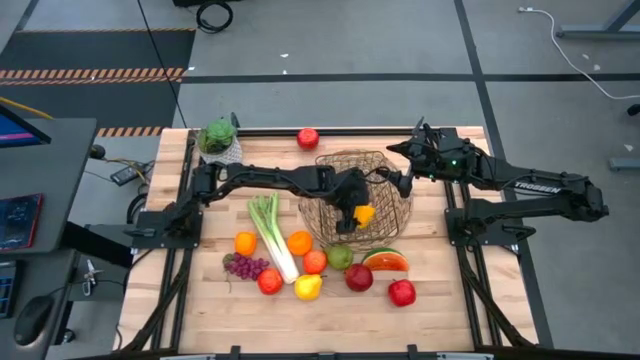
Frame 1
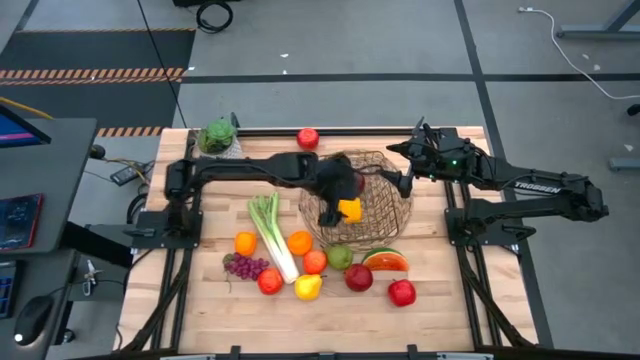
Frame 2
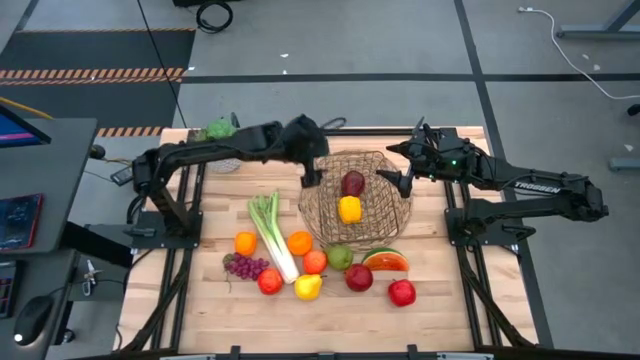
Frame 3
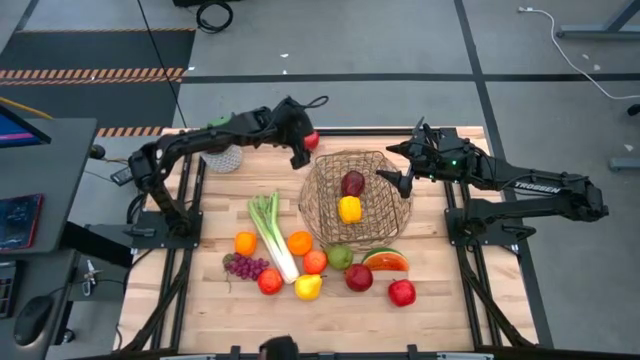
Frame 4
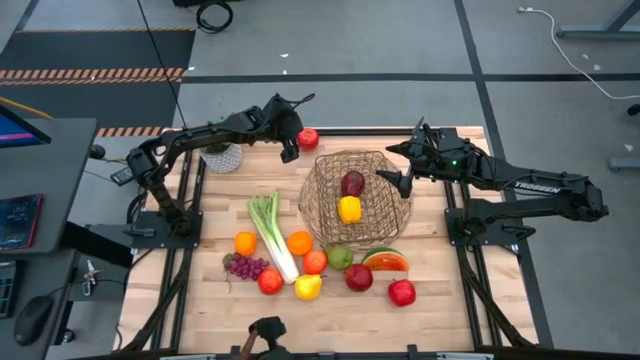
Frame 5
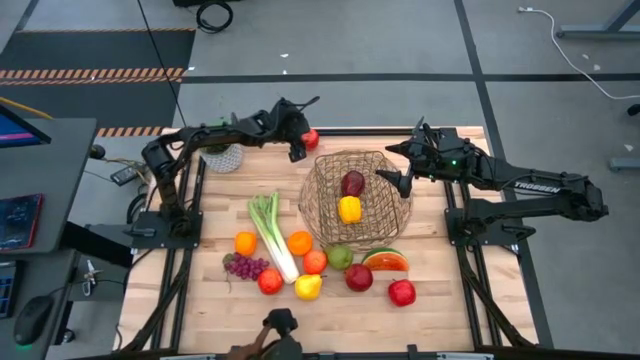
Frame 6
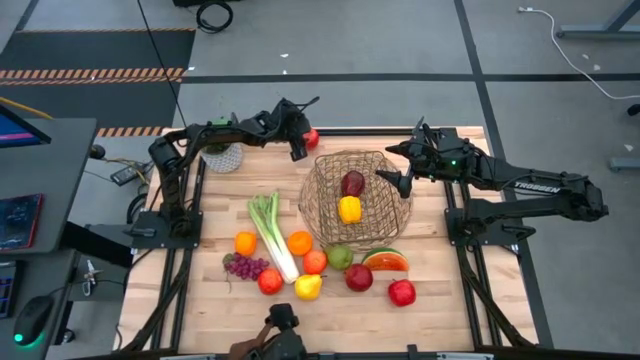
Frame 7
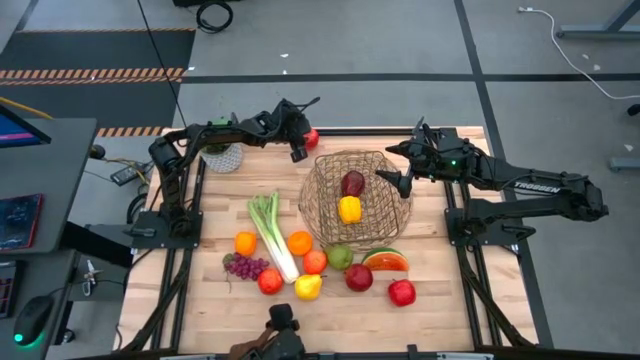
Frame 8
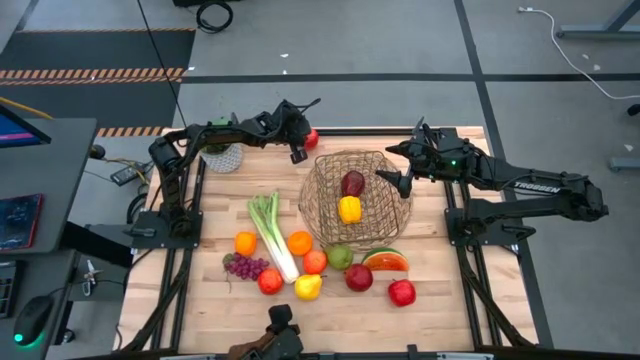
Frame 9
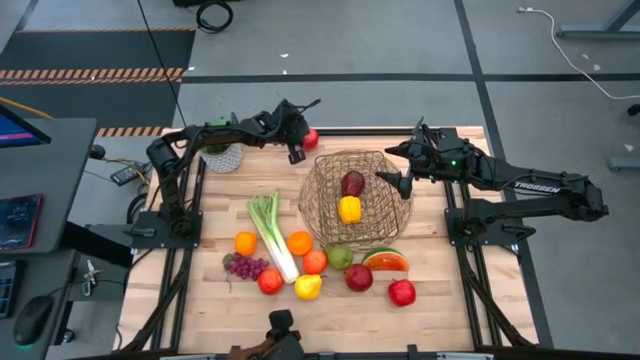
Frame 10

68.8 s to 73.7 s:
Task: Build produce basket
Put the red apple into the brown wire basket

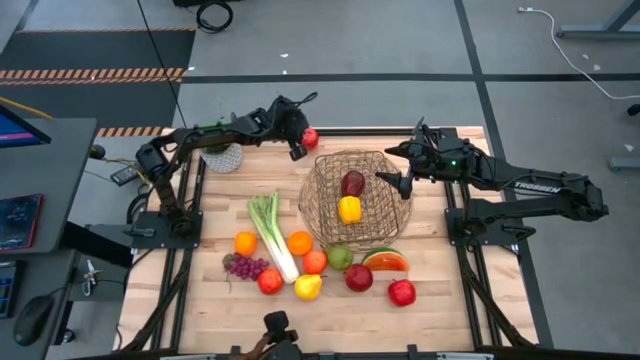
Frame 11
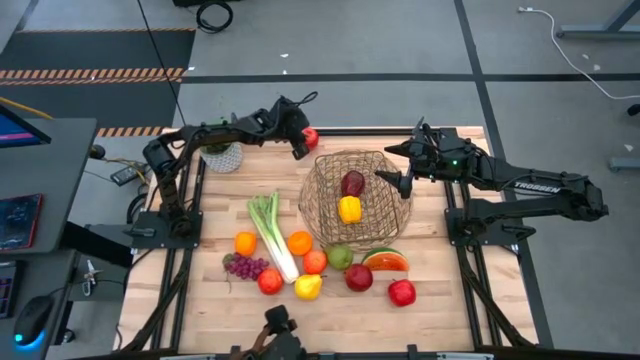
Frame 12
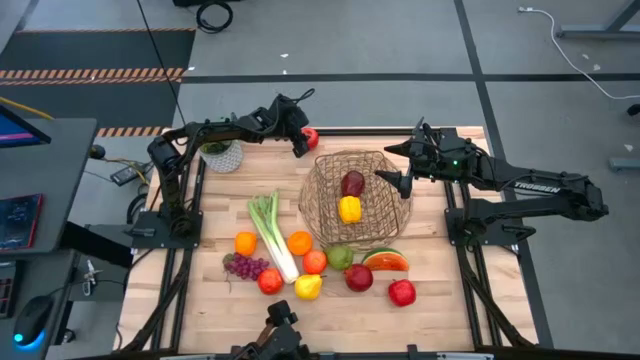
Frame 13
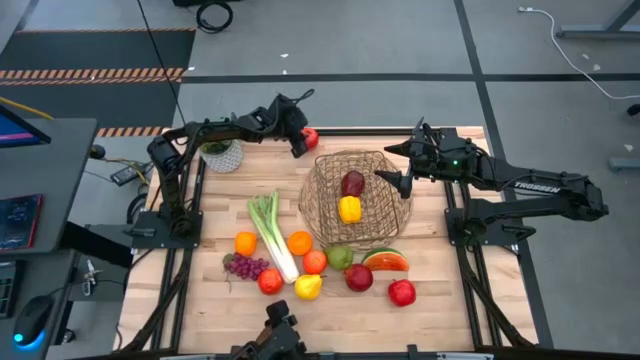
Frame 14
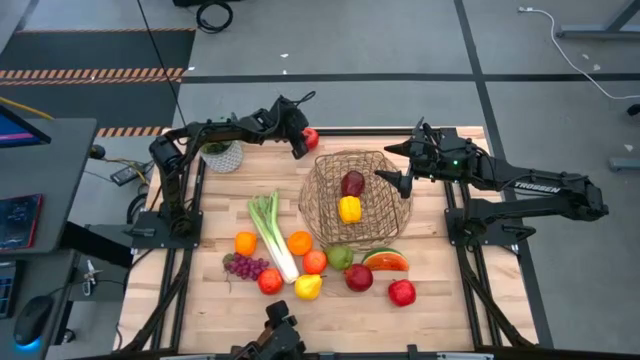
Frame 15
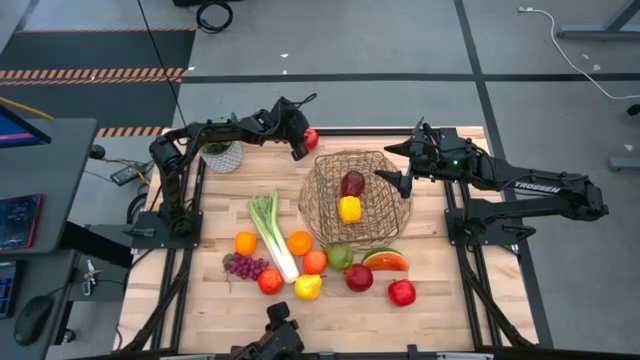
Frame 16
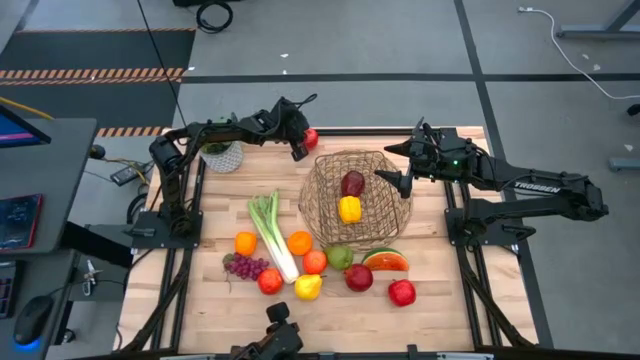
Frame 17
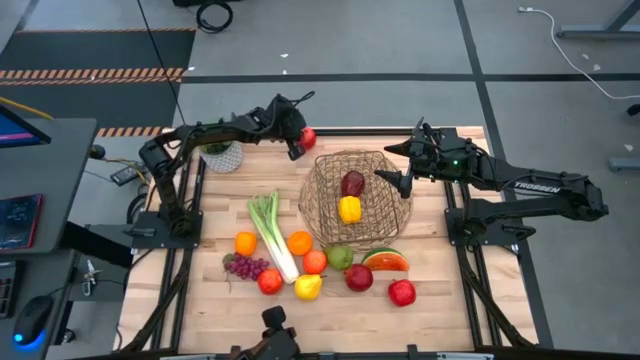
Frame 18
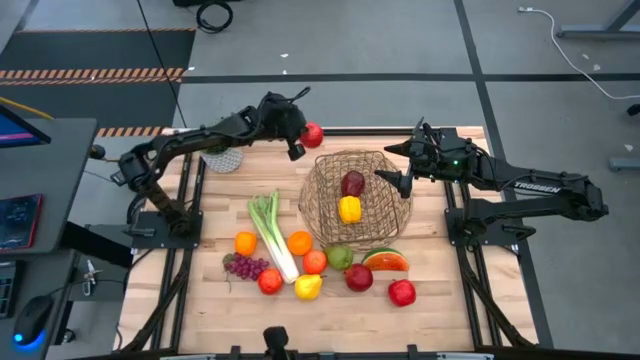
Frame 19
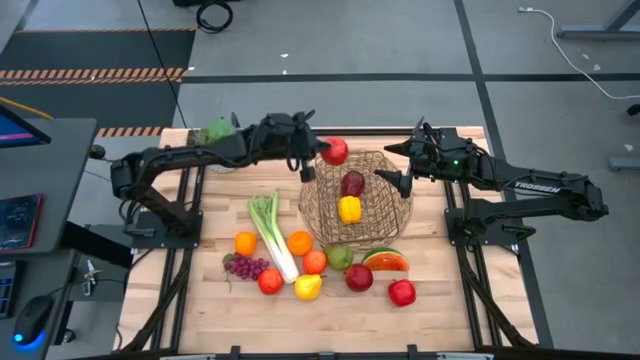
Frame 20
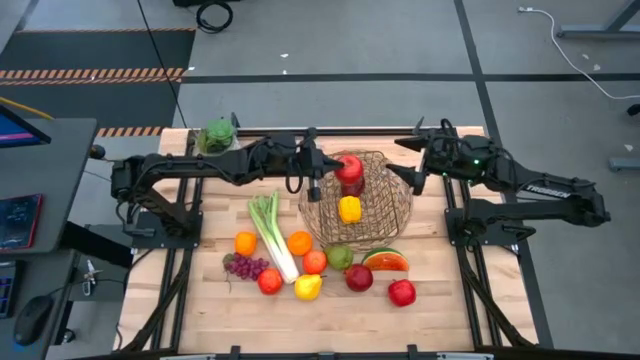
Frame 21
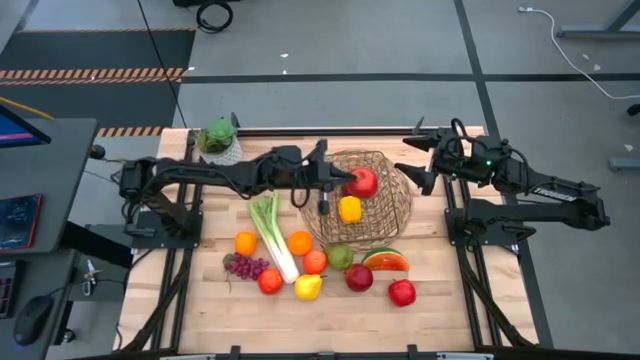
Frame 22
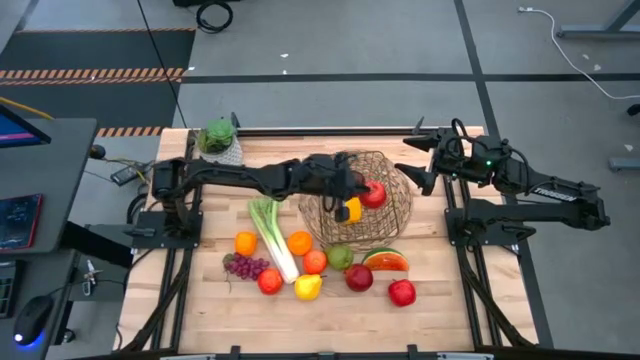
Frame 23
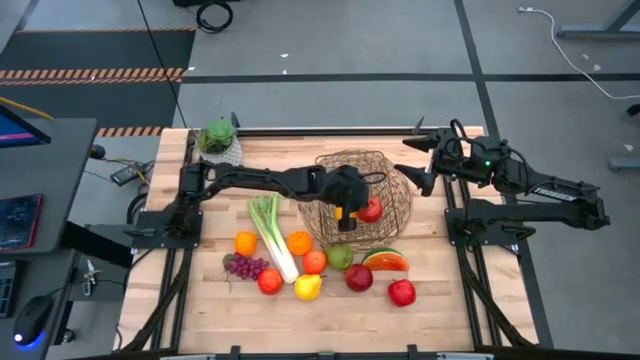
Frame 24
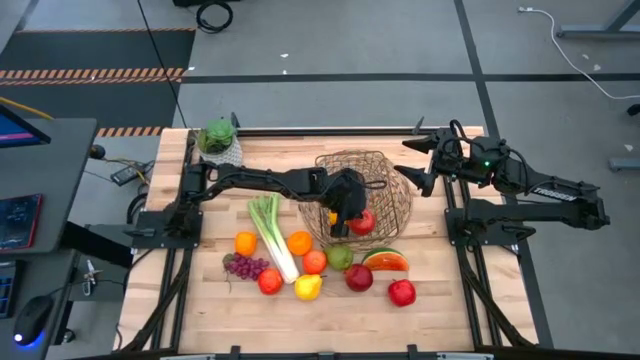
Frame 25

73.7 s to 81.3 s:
Put the red apple into the brown wire basket

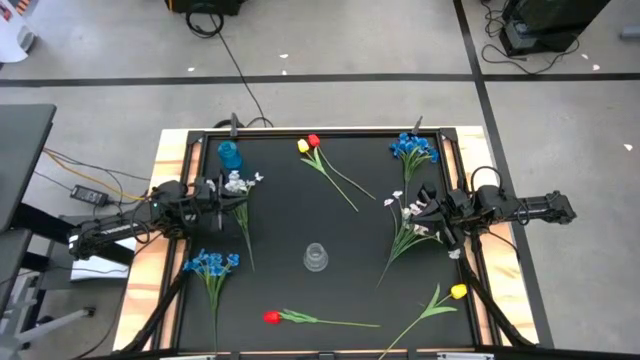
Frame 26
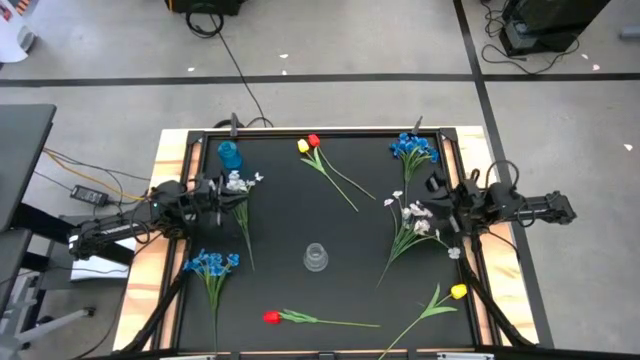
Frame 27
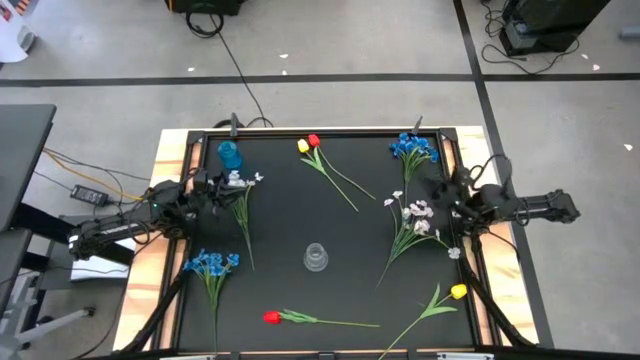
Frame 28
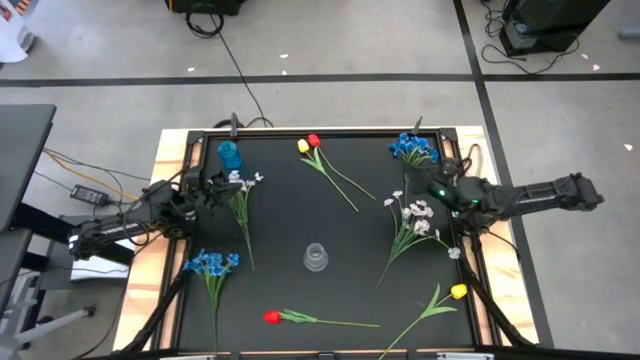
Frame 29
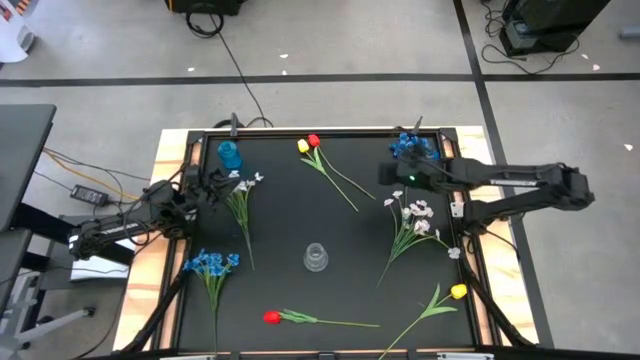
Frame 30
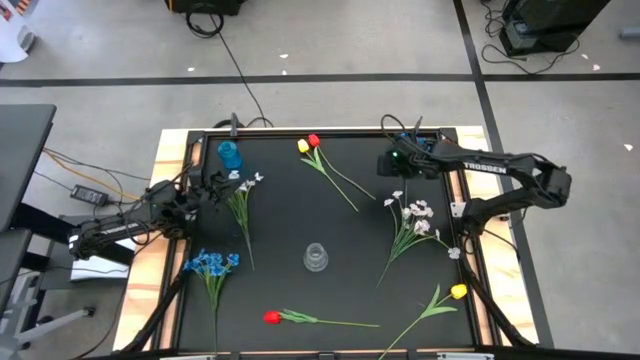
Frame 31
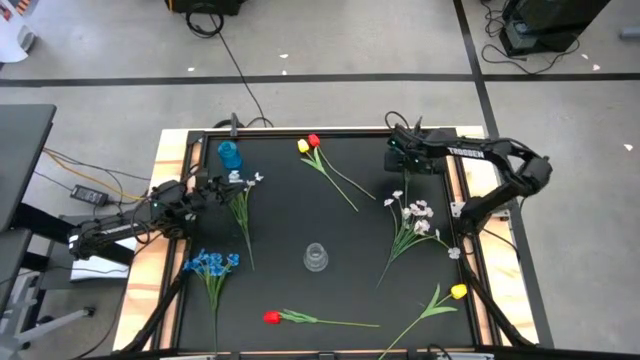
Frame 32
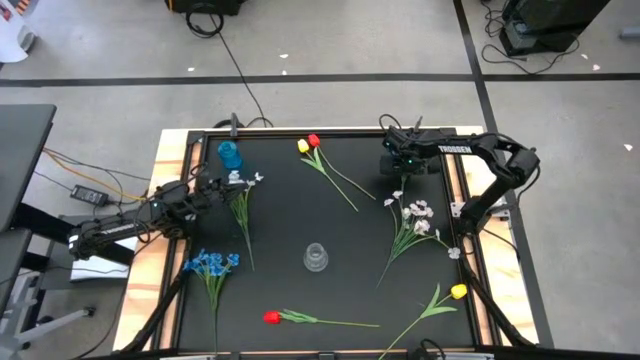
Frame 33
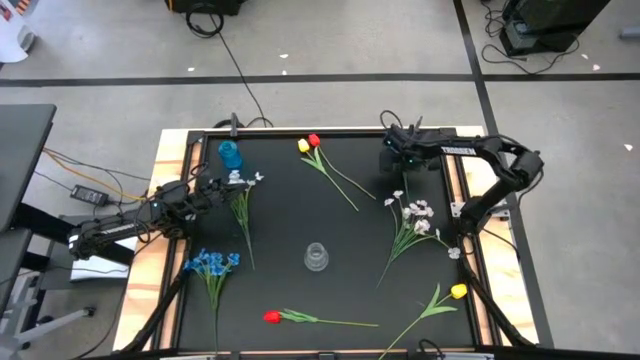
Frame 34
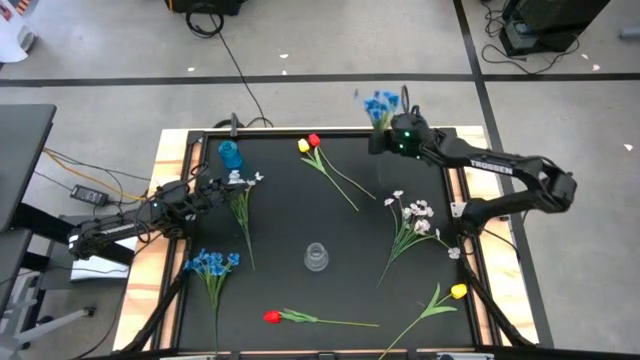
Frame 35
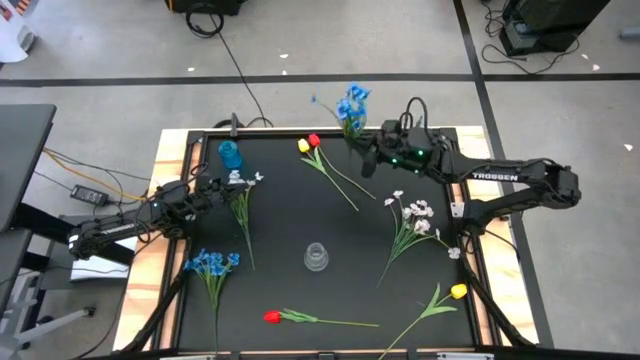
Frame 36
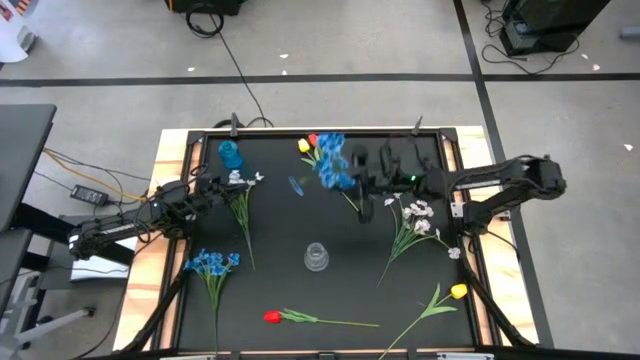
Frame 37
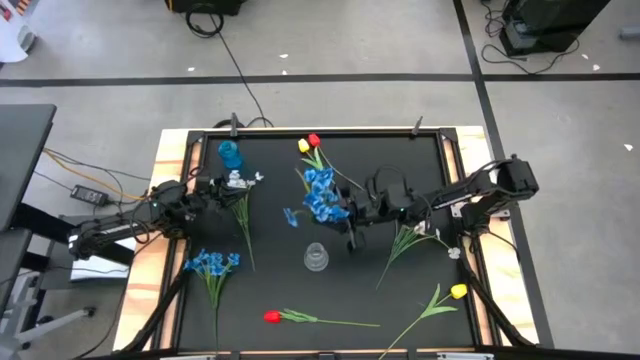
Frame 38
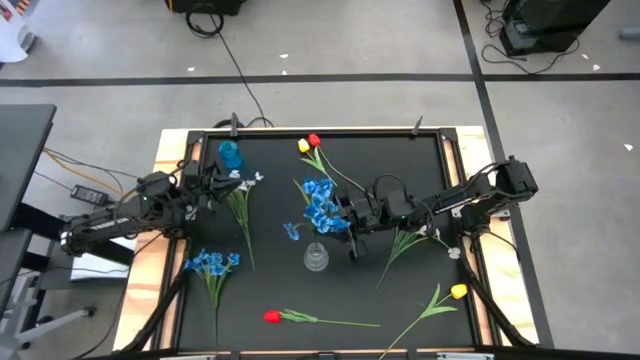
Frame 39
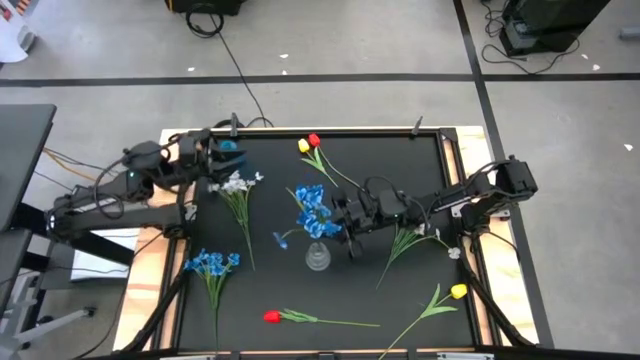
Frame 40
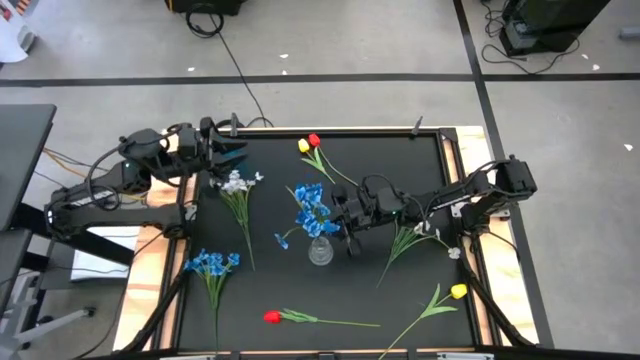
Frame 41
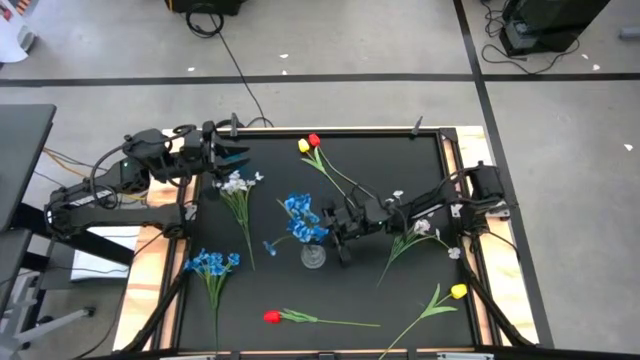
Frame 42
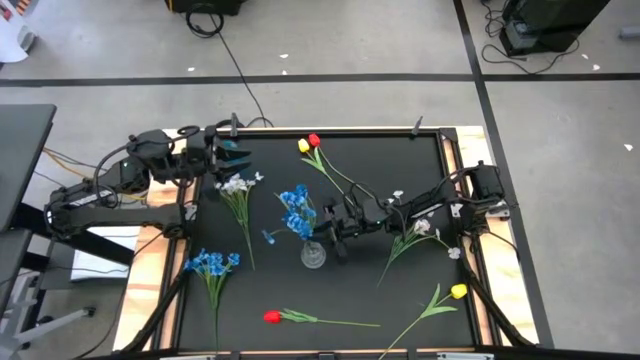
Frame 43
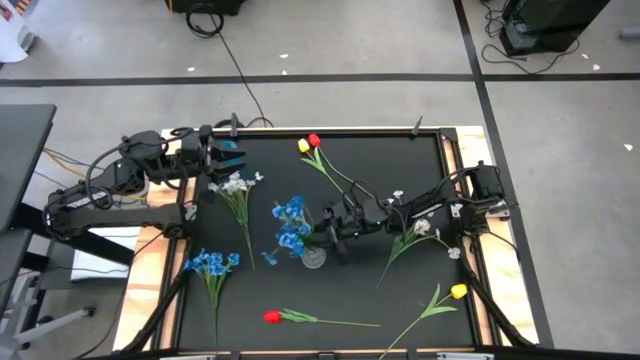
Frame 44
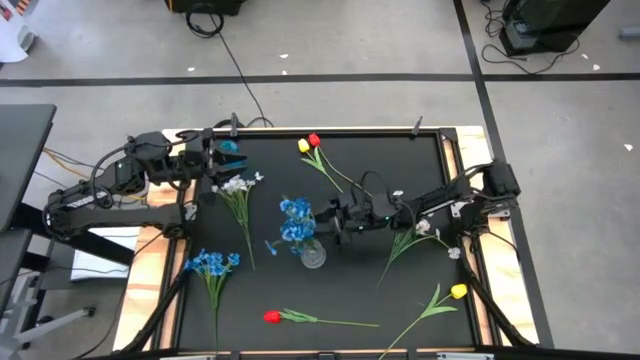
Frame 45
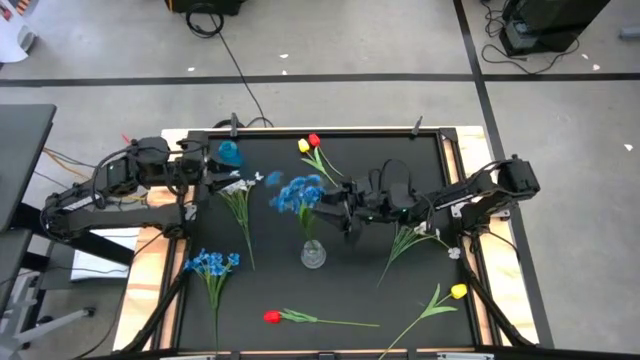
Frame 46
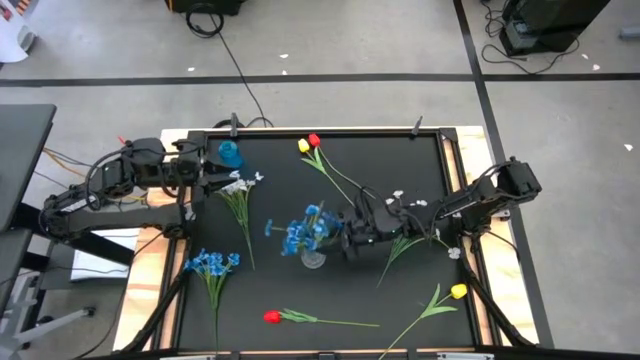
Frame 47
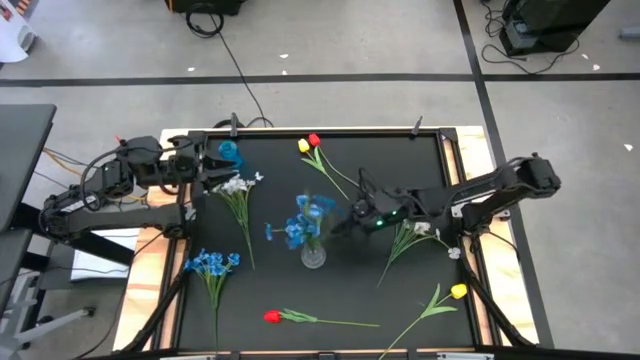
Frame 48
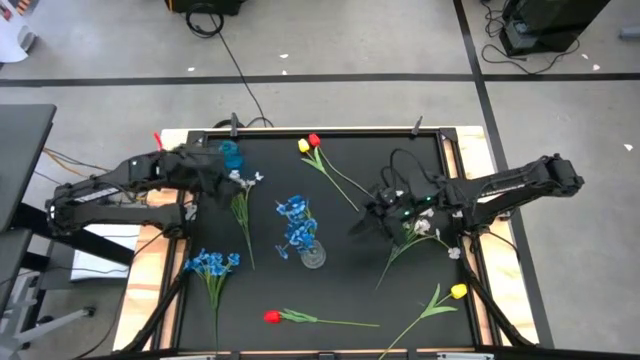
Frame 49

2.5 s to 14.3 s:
Task: Sort flowers into vase by color
Put the right blue flower into the blue vase
